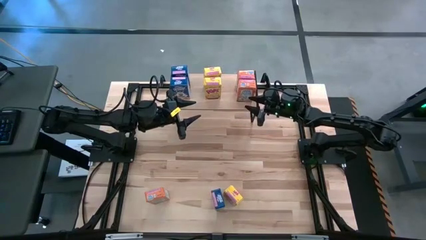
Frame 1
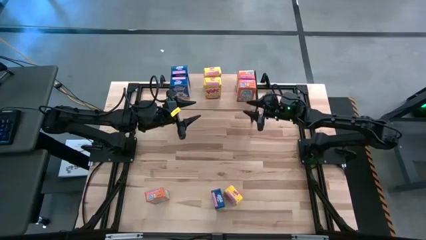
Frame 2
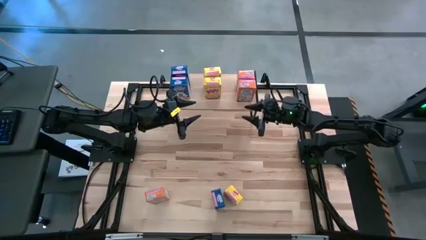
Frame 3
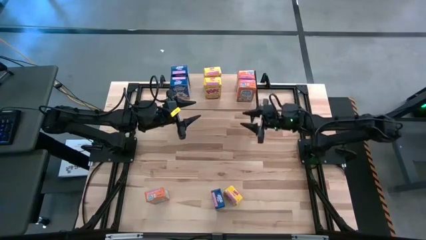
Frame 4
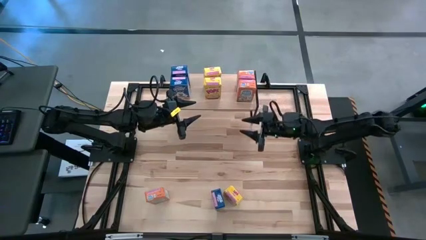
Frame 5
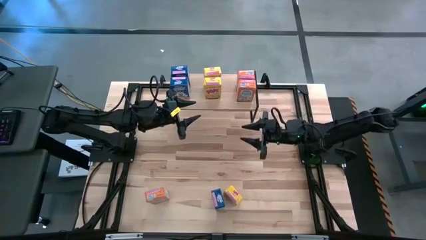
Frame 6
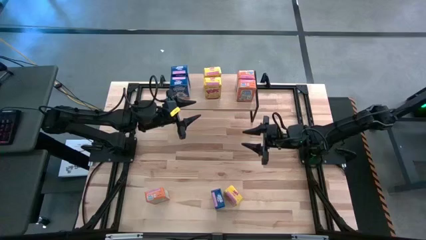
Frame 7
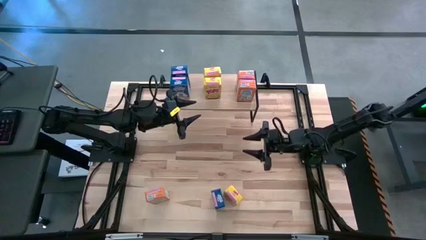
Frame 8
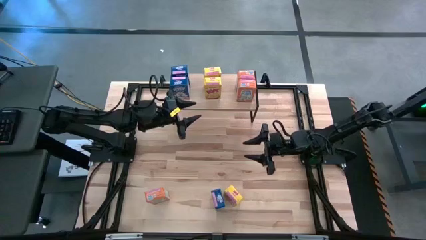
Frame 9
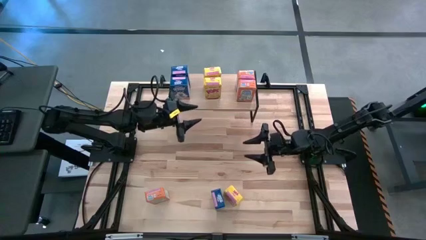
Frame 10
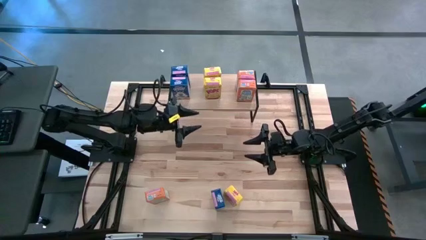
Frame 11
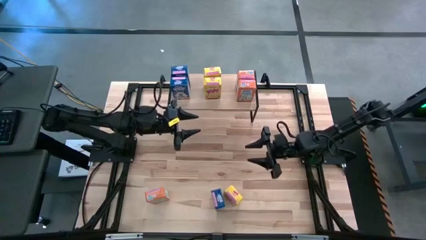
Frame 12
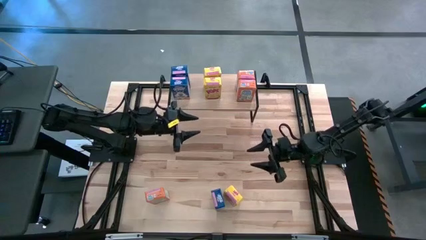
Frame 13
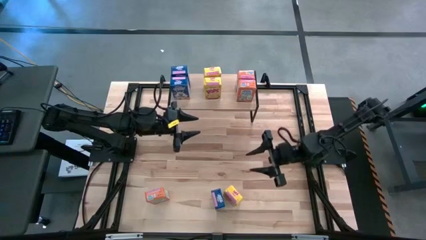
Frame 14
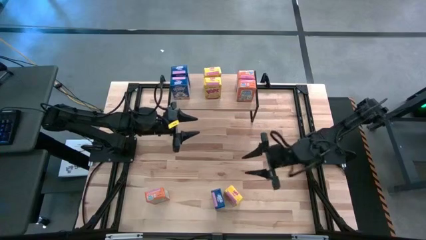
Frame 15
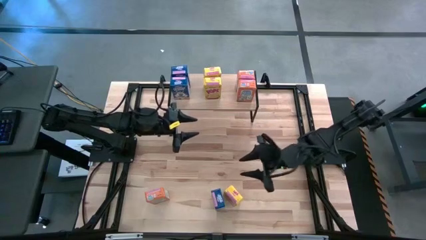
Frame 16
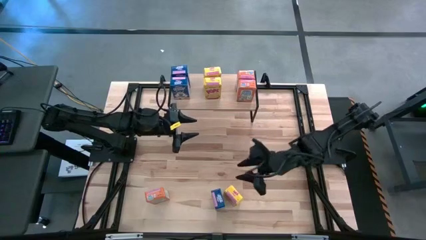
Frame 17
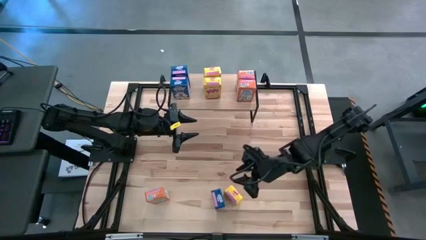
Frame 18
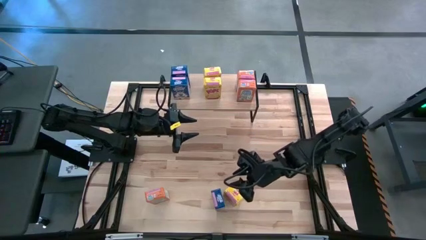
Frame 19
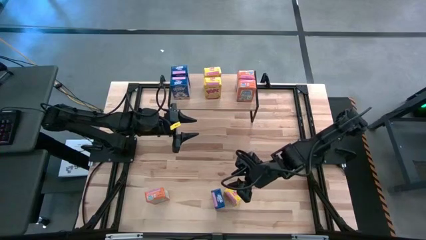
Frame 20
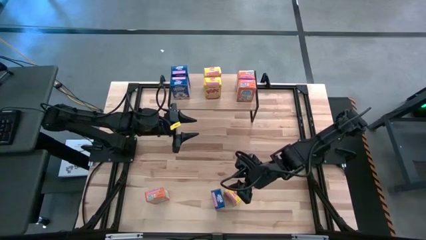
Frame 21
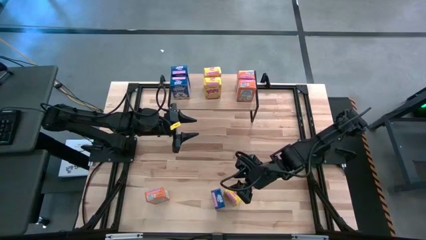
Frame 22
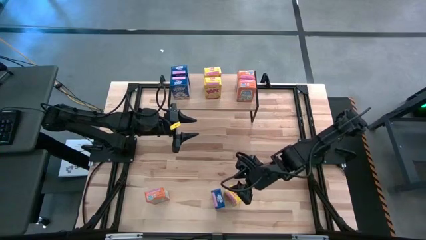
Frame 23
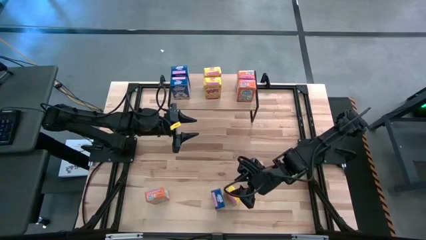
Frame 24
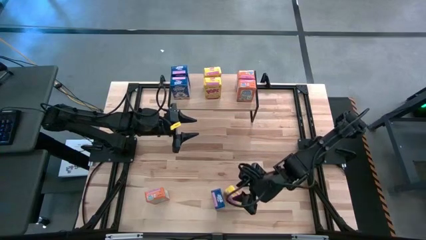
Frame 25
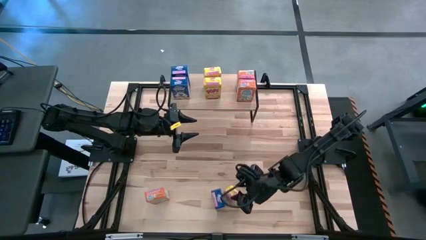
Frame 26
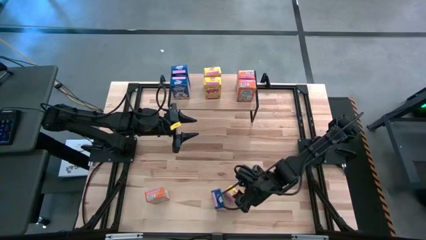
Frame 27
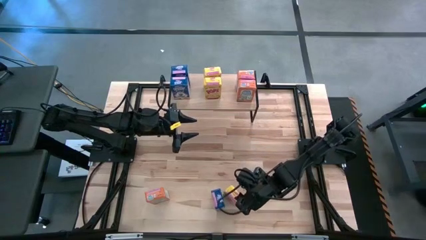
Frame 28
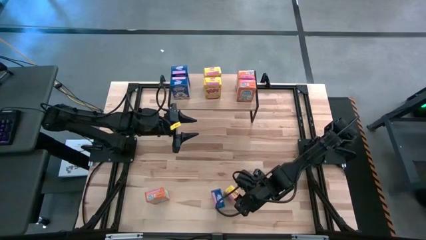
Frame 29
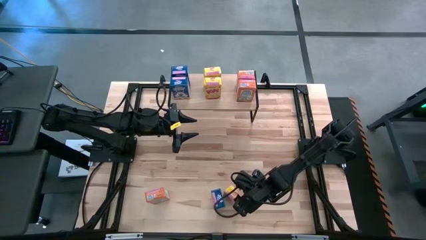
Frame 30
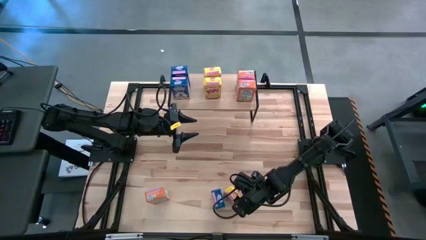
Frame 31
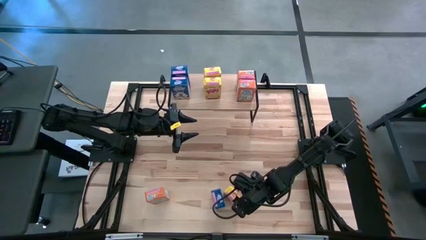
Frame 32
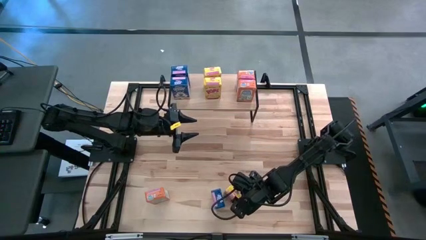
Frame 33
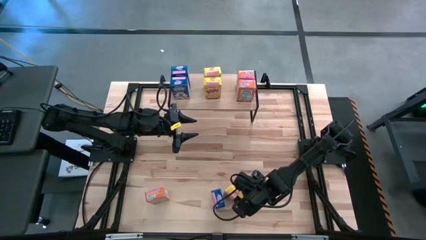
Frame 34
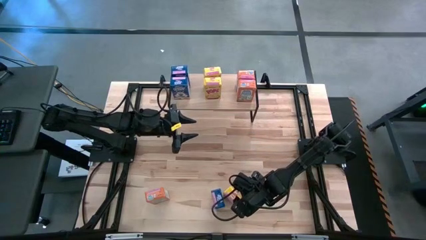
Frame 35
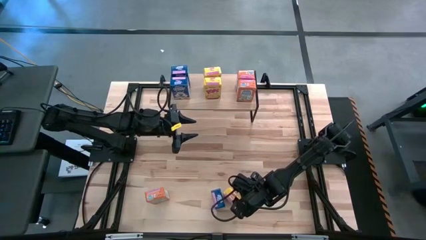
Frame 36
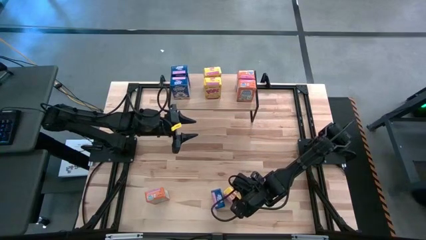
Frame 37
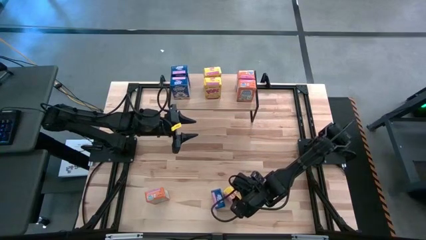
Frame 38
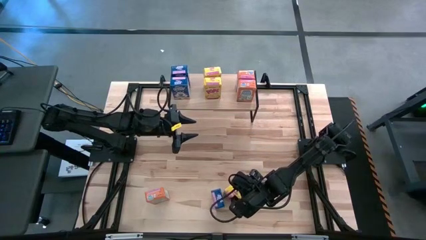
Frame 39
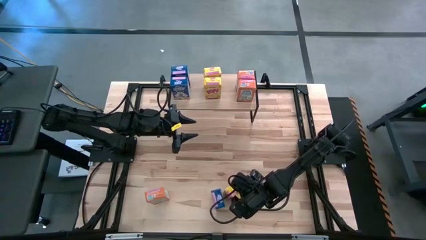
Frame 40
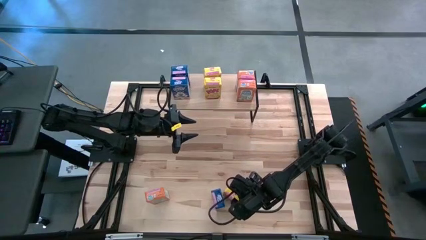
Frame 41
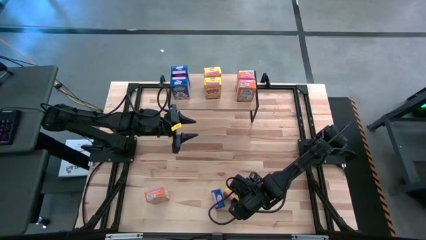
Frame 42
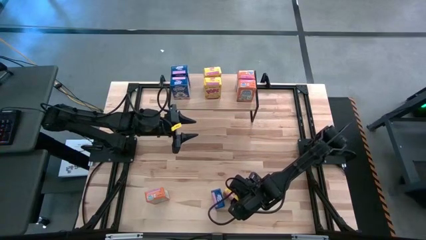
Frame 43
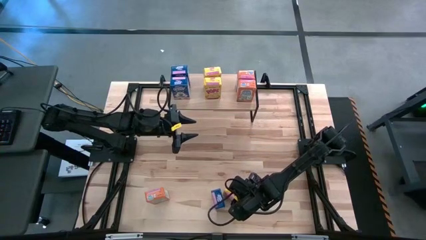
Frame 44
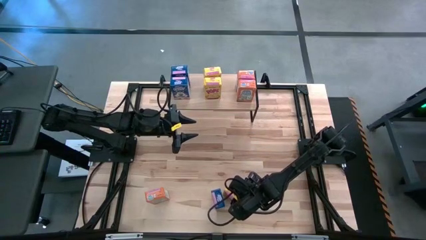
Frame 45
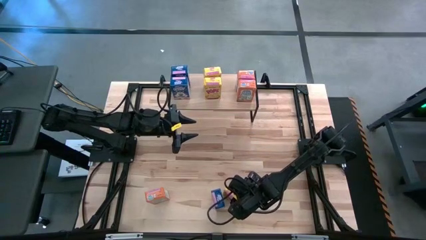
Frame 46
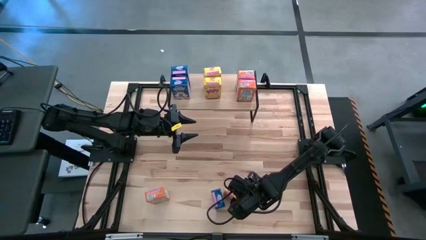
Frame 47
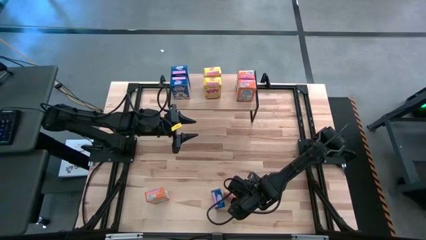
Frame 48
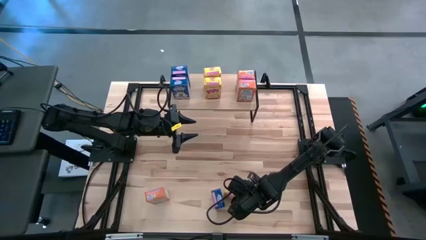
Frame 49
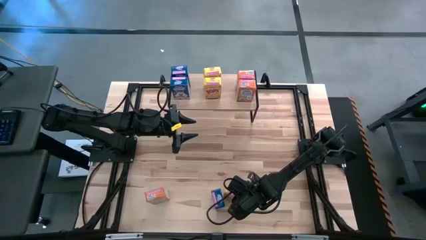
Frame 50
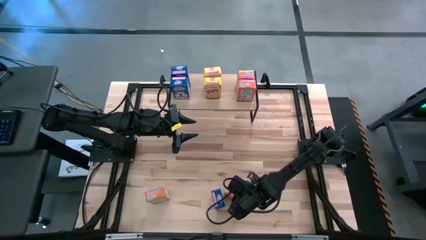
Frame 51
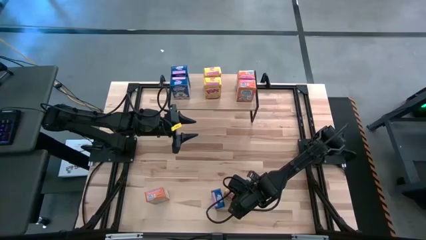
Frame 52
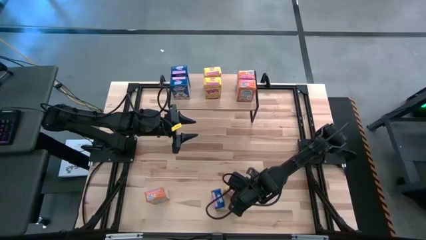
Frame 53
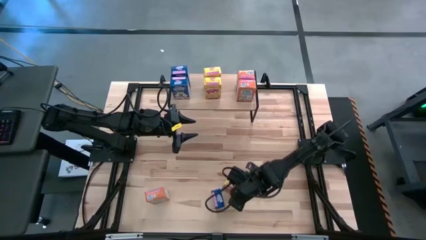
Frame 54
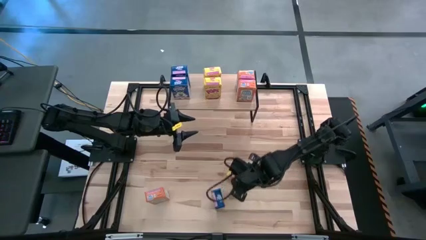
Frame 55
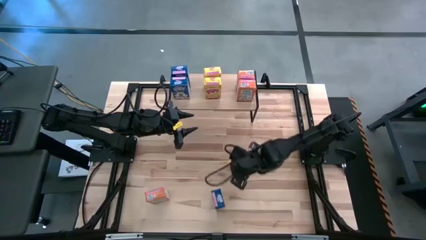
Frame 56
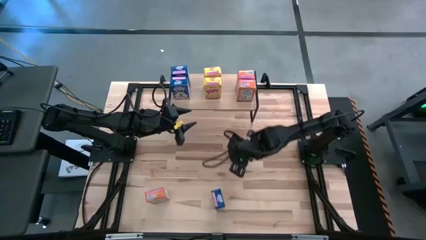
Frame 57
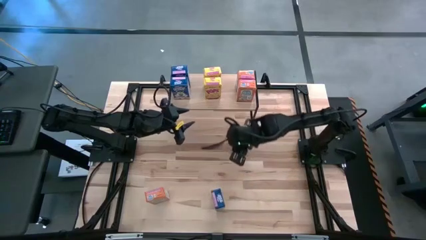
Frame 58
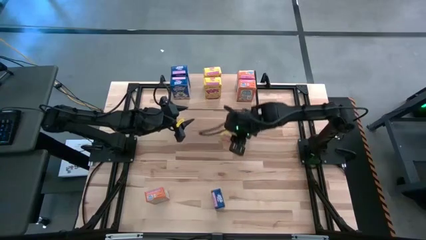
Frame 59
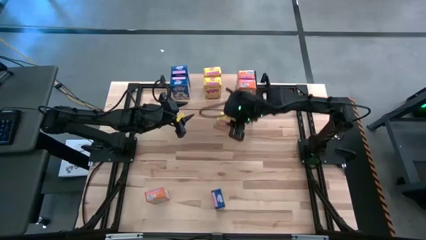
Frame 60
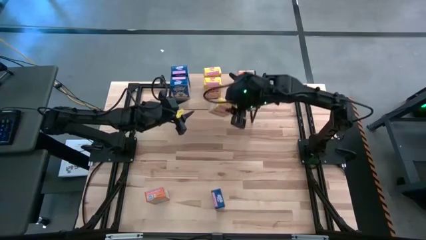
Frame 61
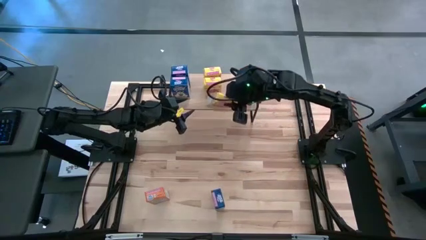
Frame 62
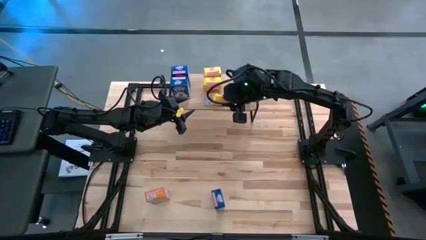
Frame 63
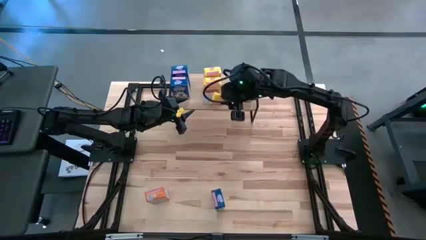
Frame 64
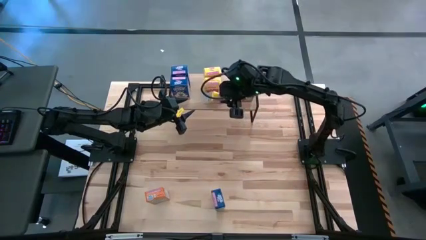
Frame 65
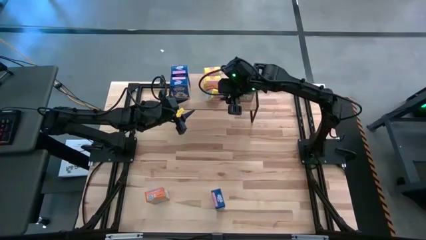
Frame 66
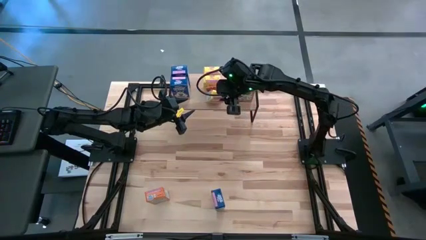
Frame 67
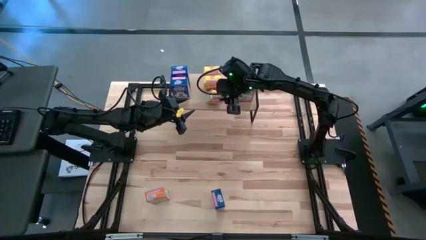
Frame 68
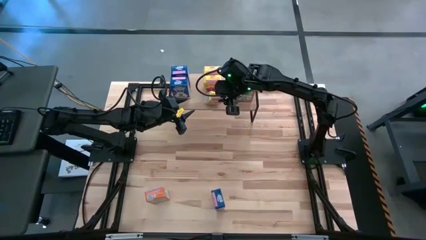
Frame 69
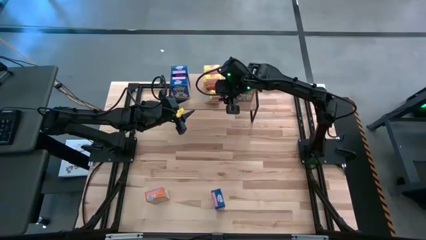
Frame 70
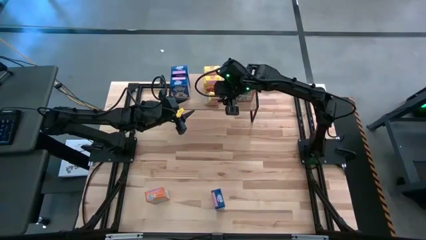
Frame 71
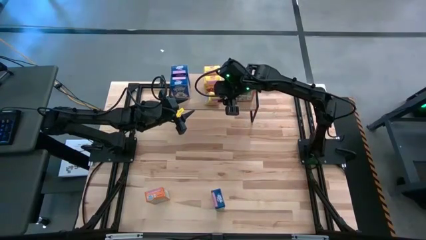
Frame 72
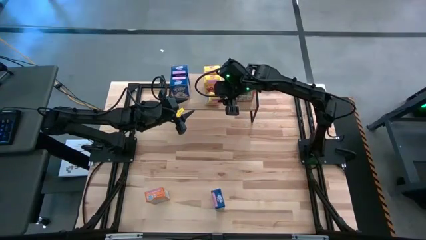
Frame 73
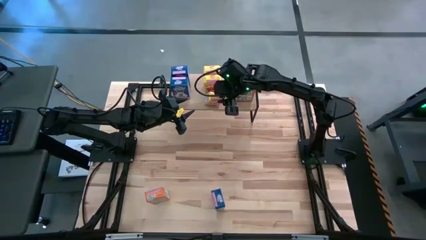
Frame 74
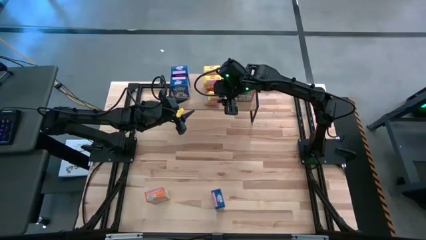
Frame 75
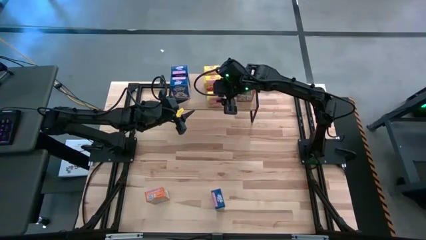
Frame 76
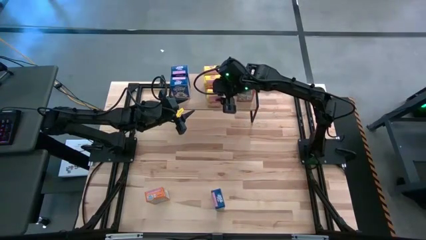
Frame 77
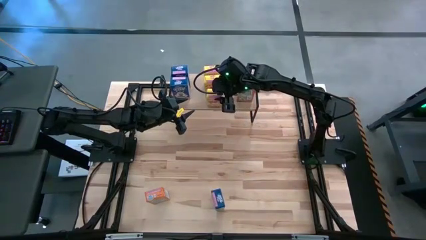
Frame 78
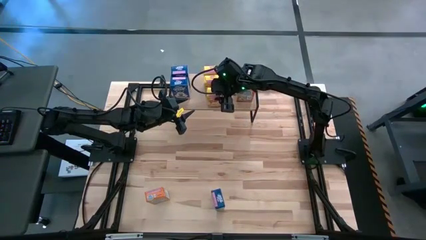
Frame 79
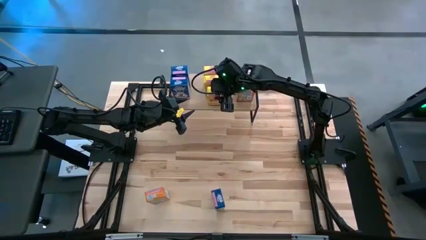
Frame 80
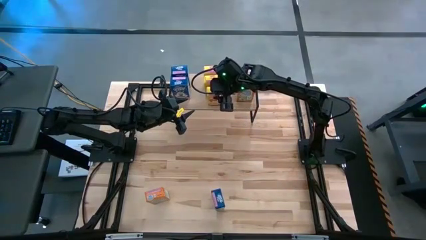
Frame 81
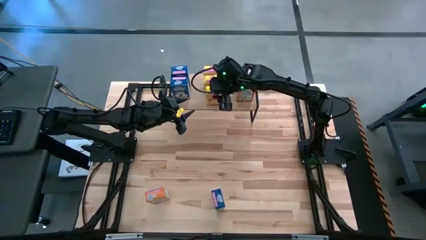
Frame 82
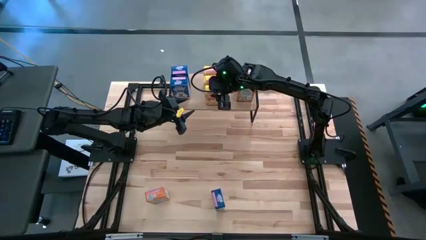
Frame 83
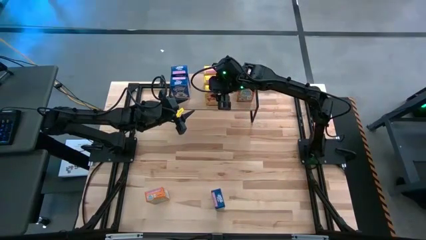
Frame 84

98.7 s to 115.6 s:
Task: Stack cereal on shelf
Put the yellow cereal box on the shelf
